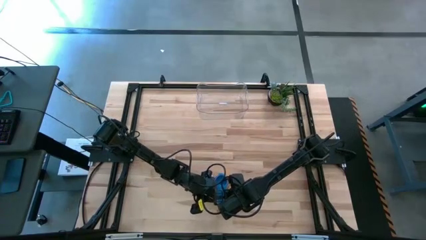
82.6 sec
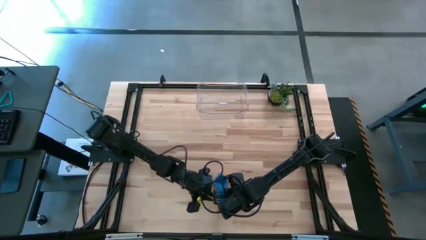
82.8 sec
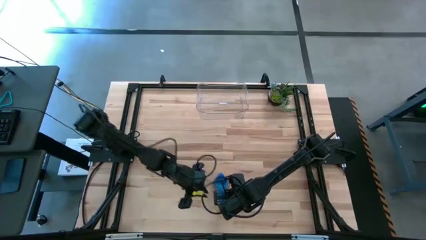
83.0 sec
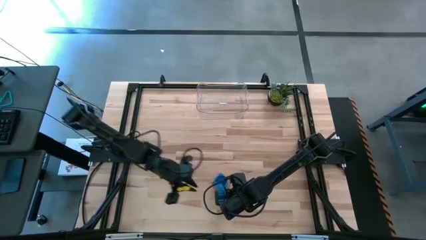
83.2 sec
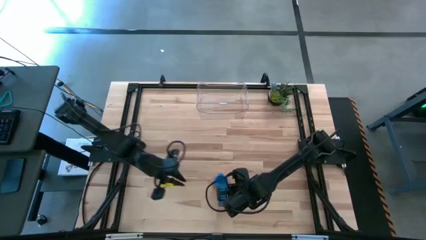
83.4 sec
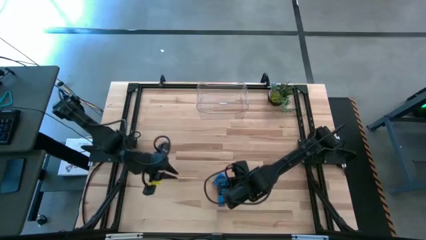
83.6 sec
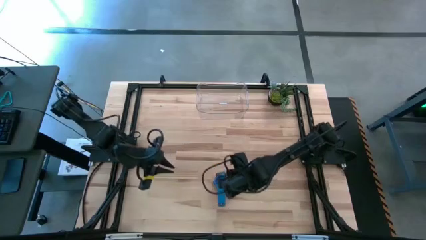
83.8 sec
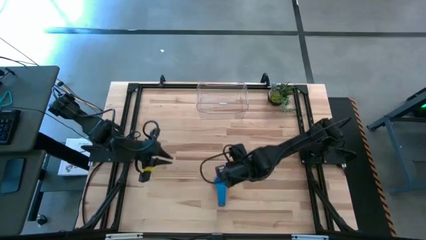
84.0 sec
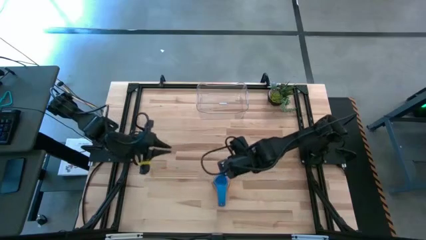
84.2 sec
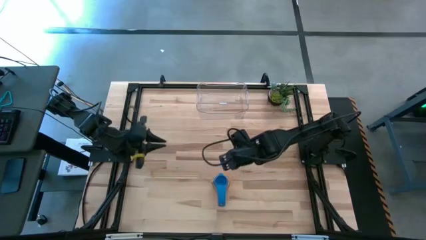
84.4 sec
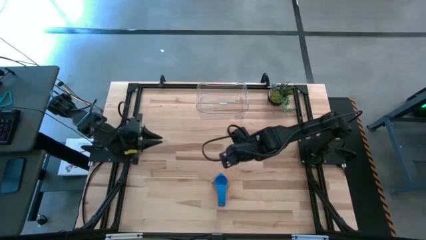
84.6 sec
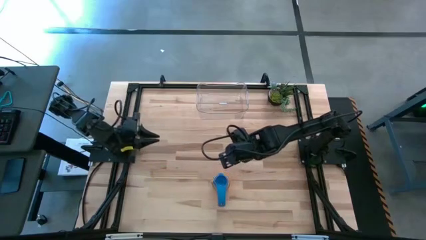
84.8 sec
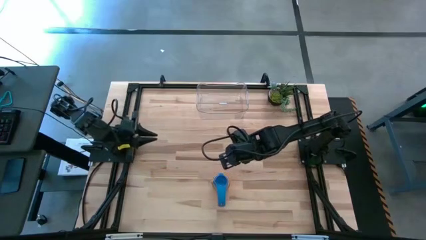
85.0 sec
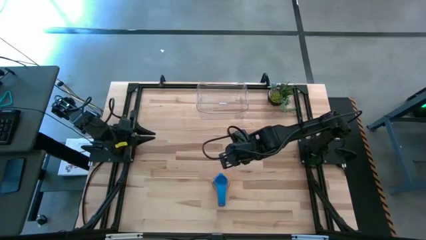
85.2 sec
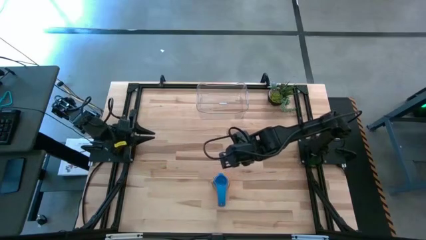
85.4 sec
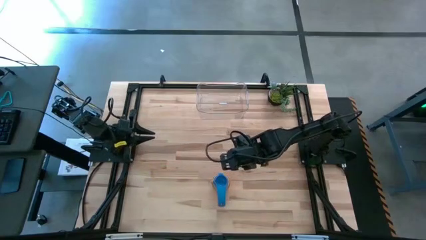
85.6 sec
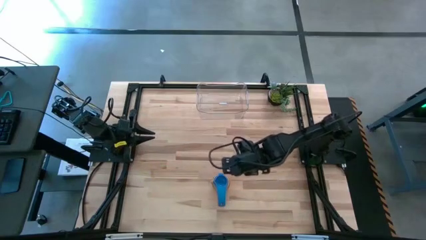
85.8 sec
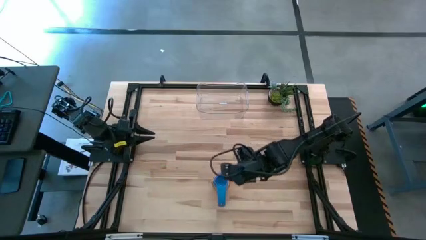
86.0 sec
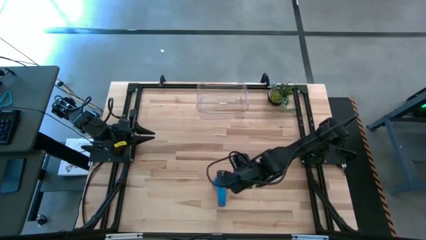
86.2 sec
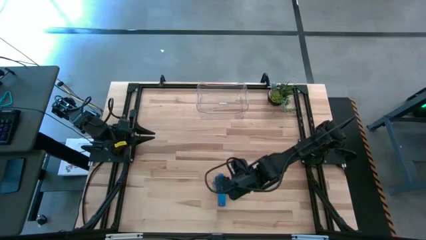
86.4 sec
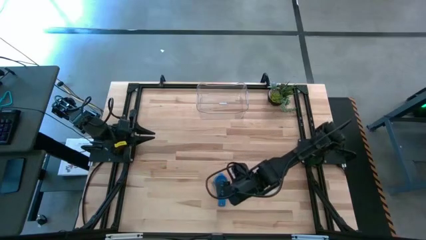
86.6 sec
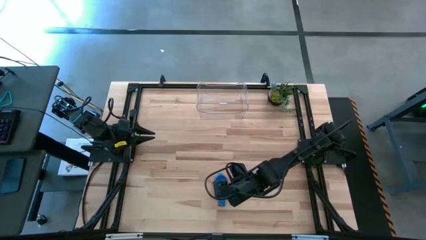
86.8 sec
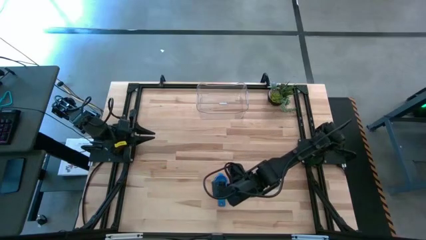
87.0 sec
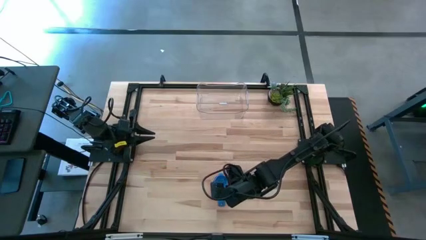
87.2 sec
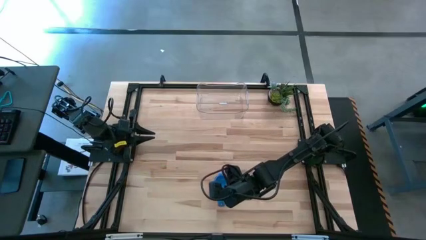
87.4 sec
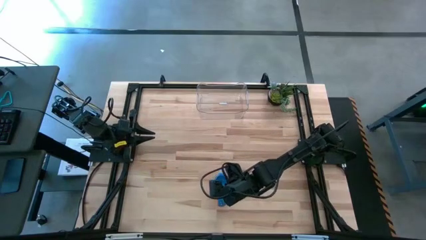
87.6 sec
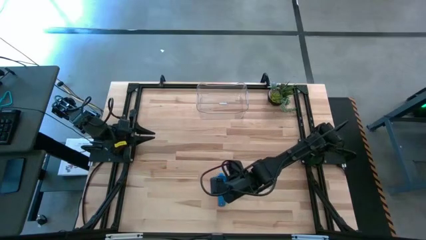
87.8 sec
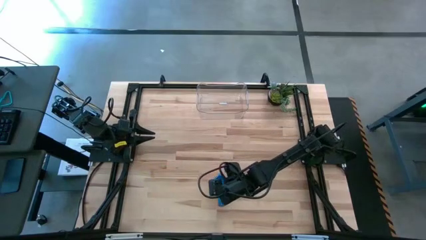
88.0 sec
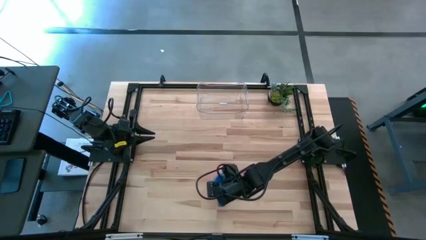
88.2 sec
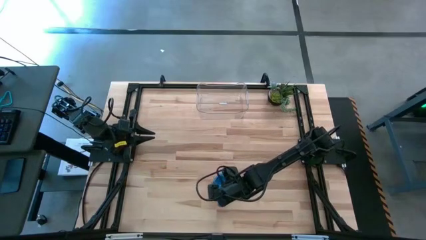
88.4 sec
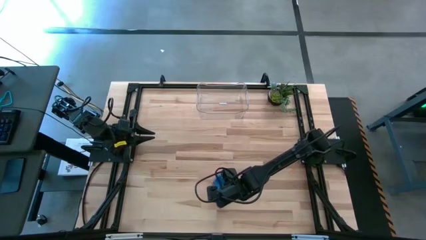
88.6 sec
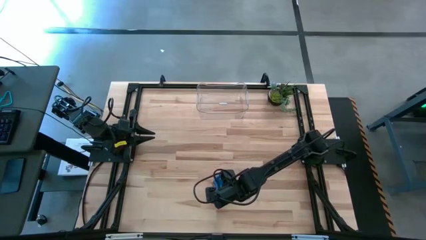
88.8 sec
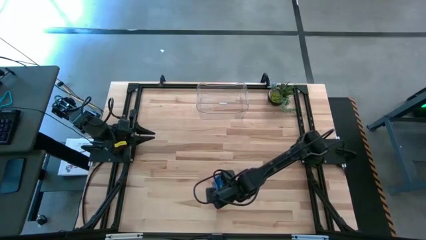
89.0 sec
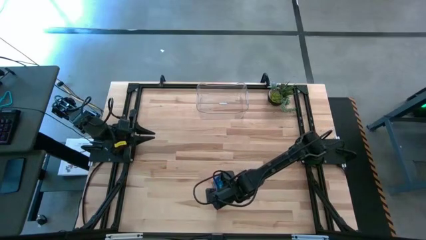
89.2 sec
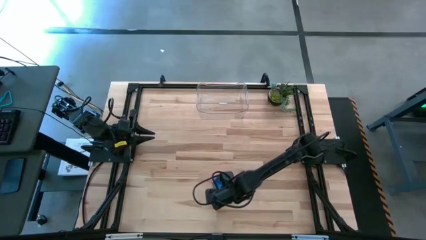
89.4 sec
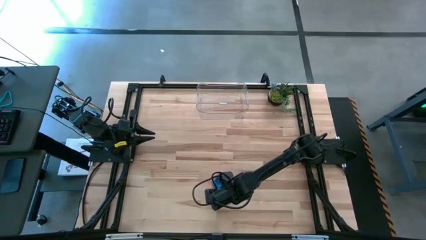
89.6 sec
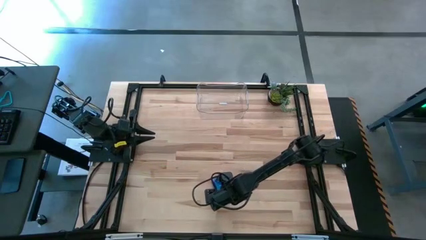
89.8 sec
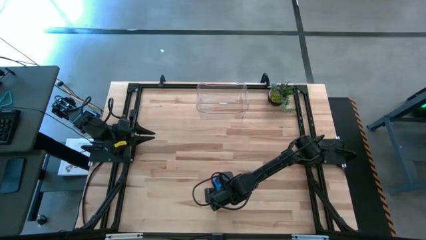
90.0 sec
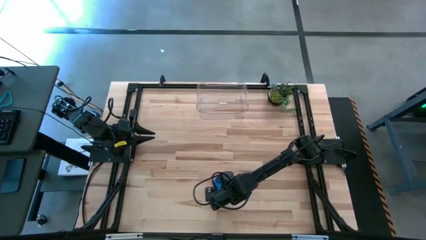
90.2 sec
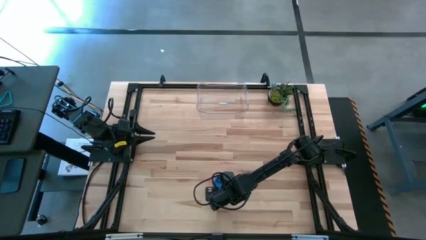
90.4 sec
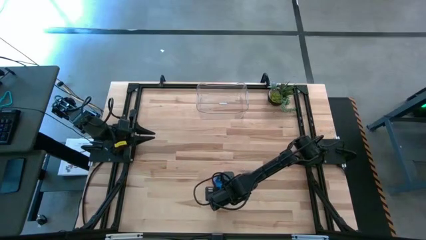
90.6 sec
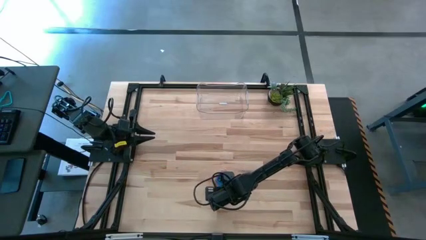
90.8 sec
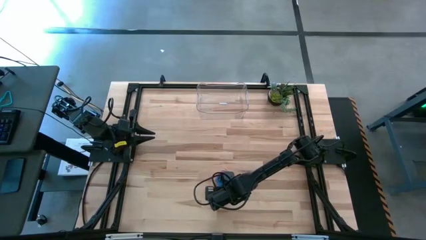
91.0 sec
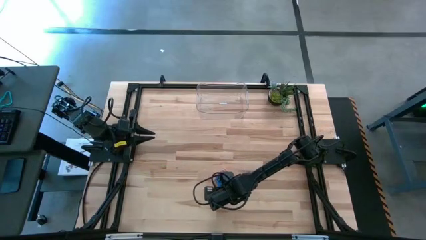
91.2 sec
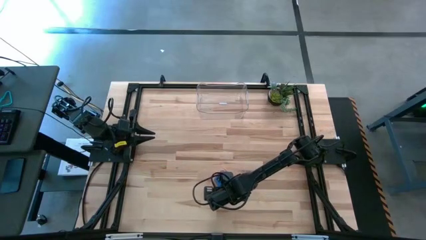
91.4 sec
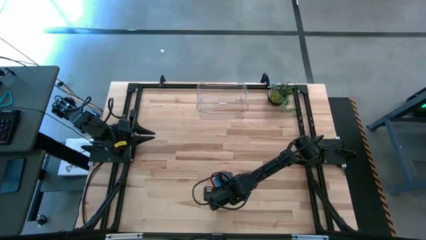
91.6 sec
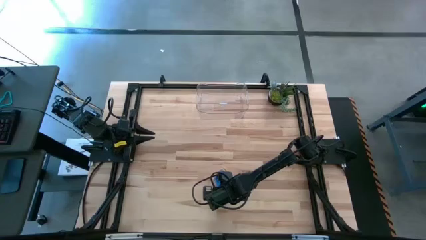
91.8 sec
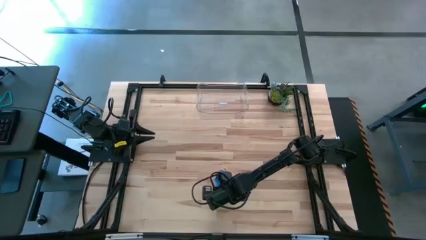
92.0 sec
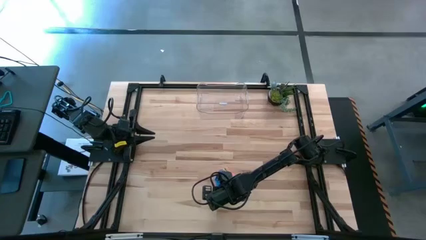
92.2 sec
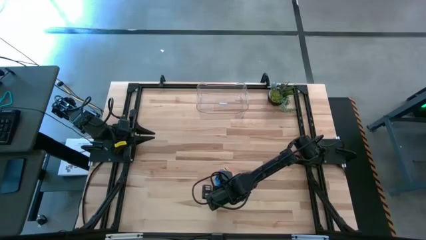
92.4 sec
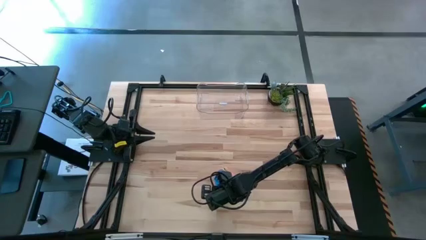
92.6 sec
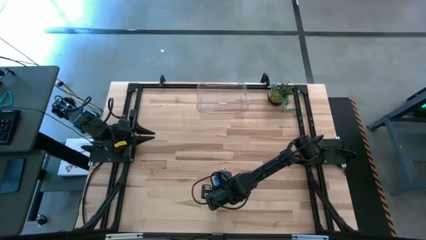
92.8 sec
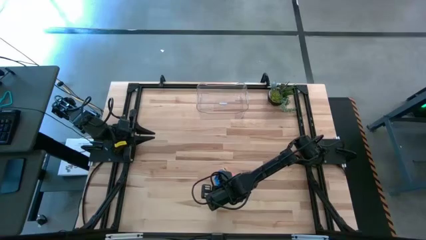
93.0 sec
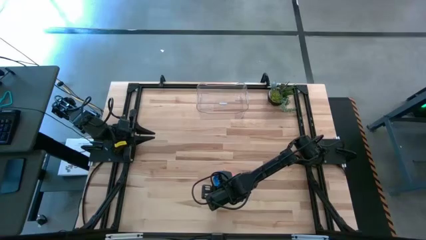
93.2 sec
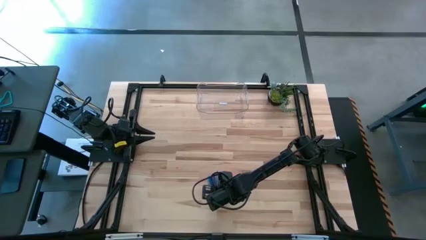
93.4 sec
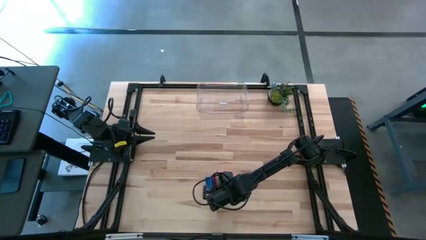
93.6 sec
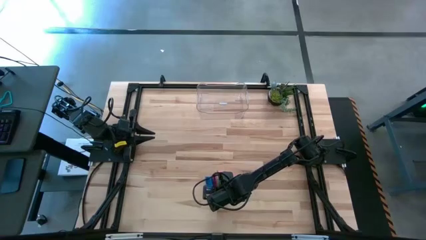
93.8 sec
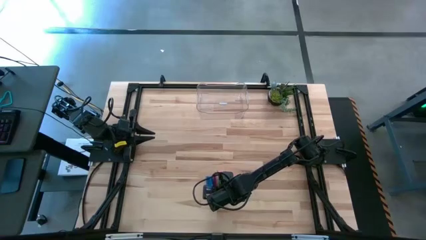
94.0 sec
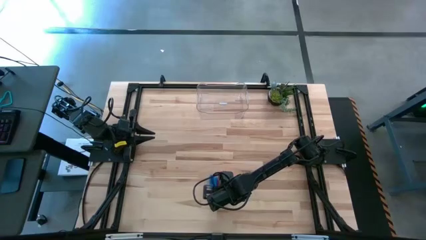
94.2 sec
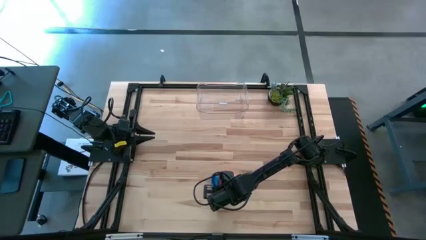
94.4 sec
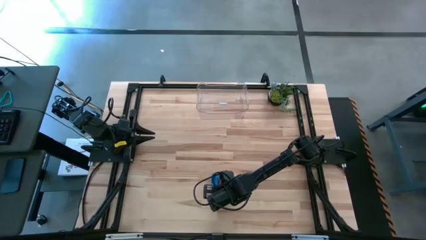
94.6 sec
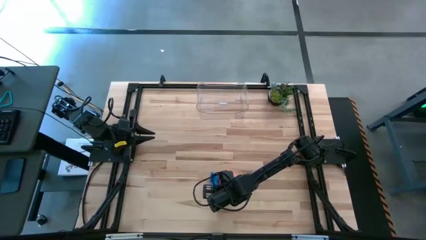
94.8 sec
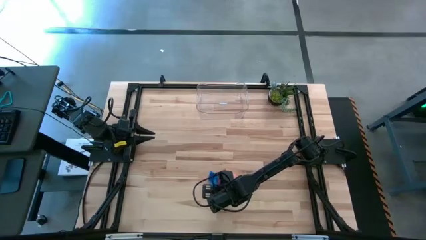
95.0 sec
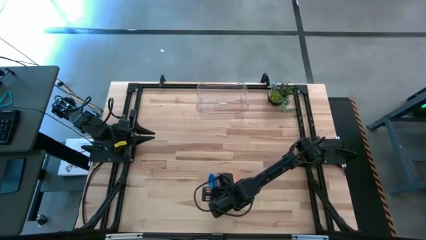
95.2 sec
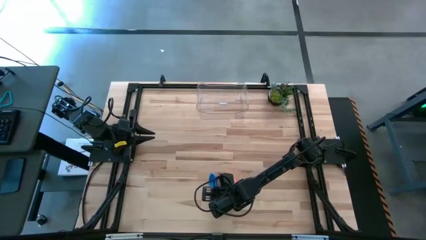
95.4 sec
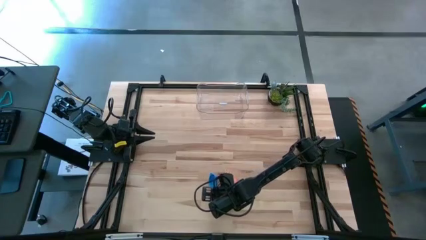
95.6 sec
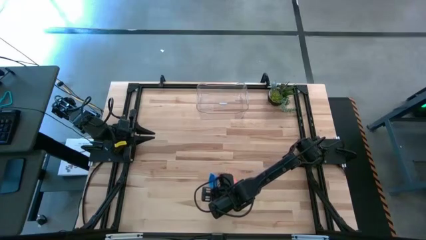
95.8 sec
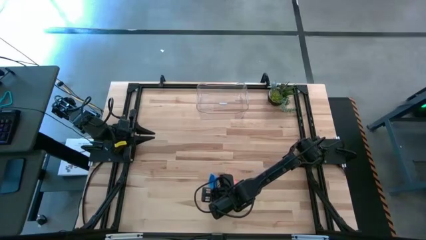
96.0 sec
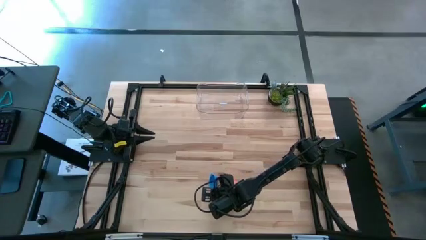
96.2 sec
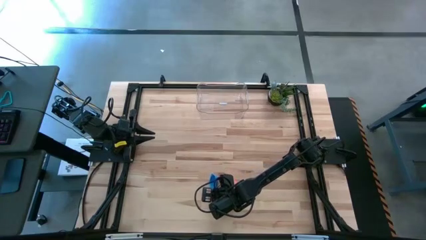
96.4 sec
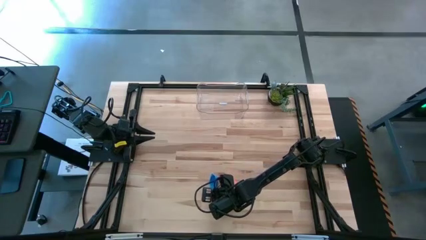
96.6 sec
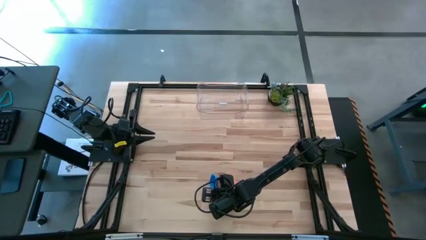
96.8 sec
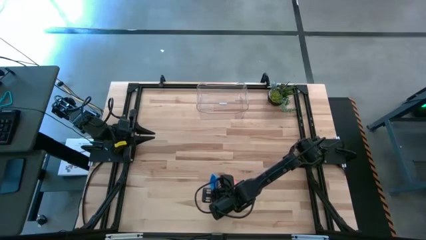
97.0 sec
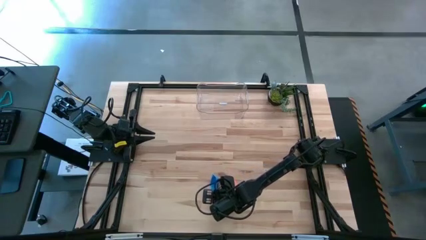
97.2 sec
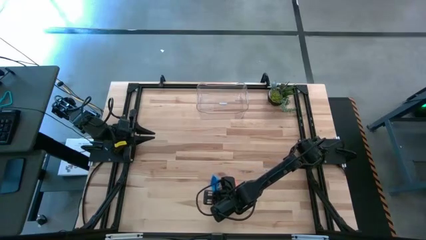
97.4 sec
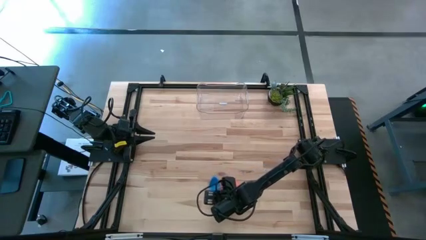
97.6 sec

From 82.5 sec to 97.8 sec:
Task: Nest measuring cups in basket
Put the nested measuring cups into the transparent bin
